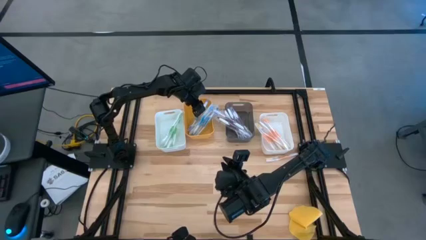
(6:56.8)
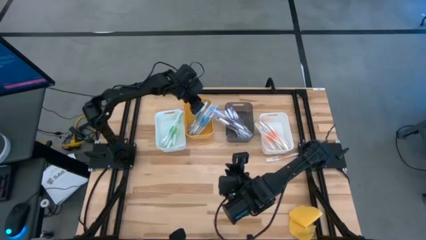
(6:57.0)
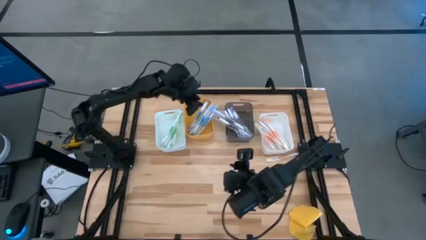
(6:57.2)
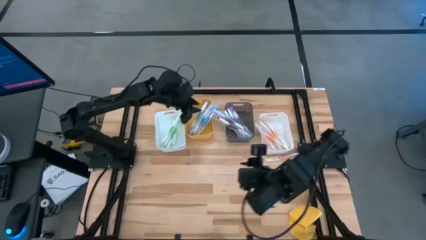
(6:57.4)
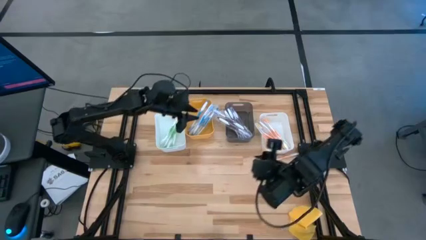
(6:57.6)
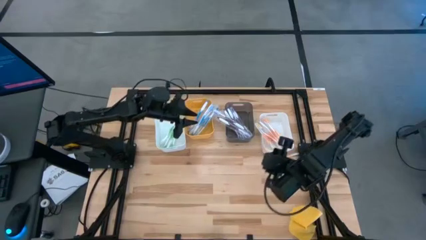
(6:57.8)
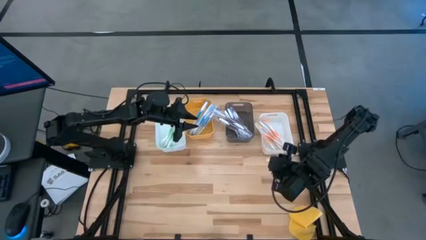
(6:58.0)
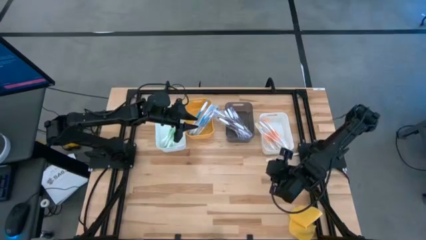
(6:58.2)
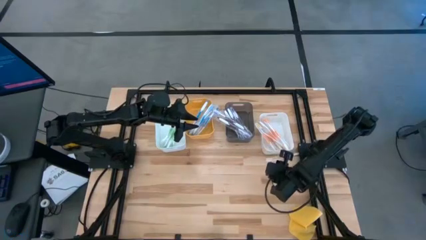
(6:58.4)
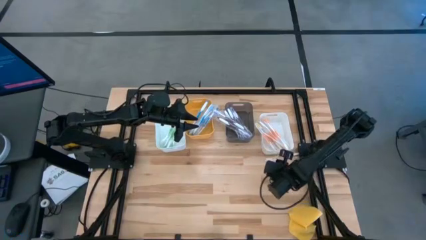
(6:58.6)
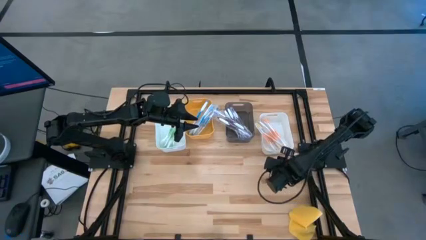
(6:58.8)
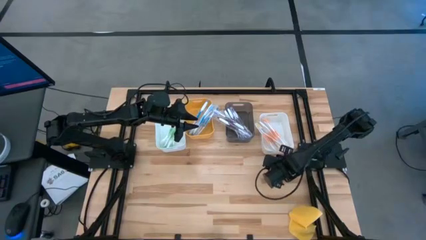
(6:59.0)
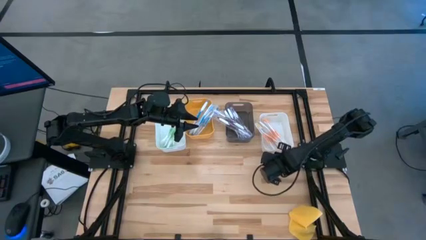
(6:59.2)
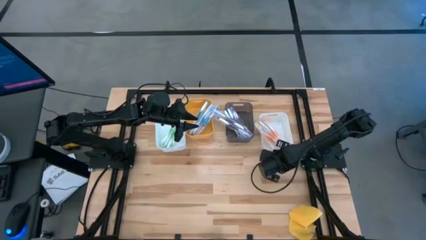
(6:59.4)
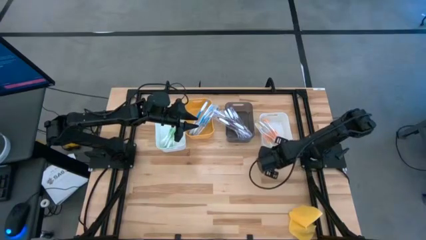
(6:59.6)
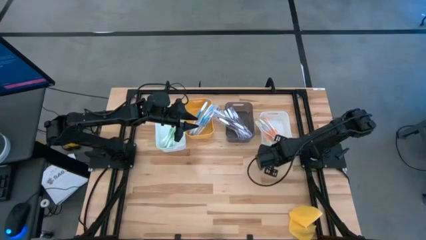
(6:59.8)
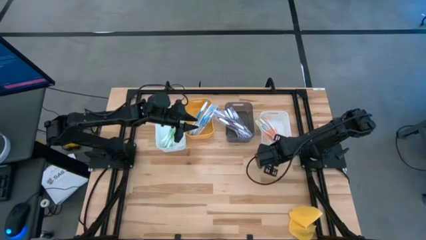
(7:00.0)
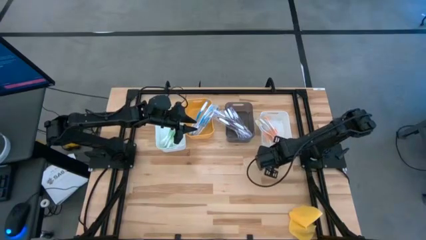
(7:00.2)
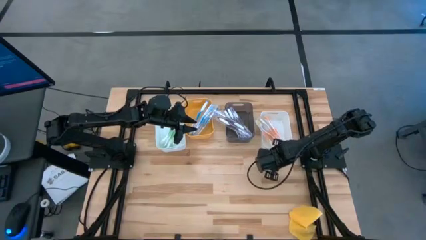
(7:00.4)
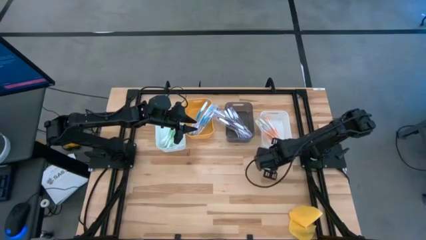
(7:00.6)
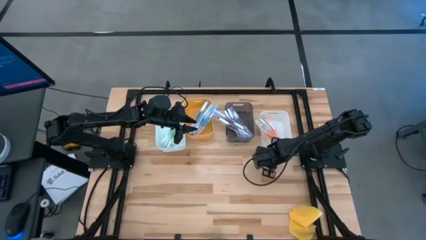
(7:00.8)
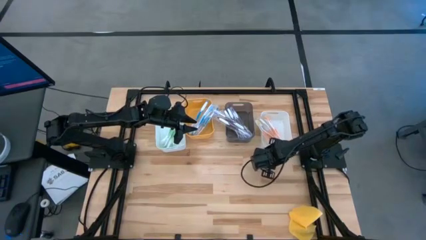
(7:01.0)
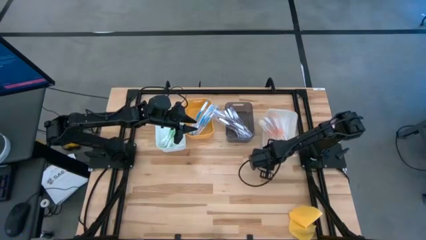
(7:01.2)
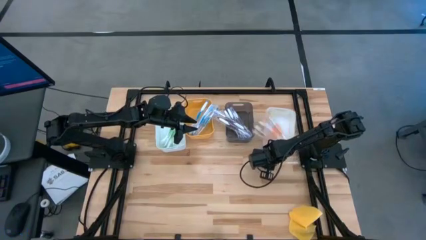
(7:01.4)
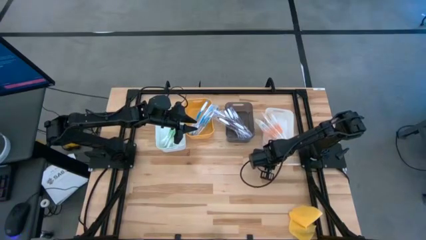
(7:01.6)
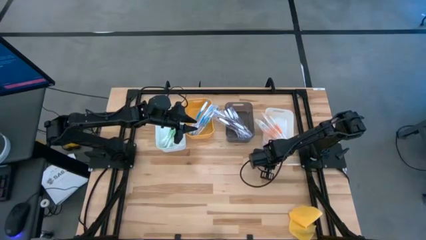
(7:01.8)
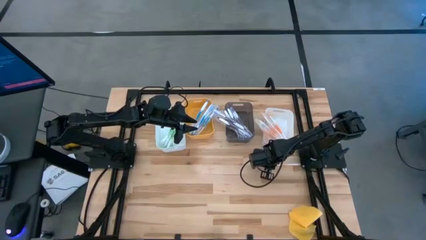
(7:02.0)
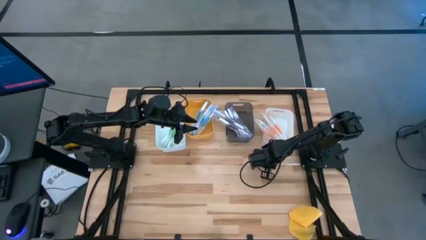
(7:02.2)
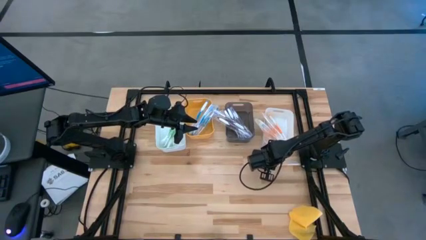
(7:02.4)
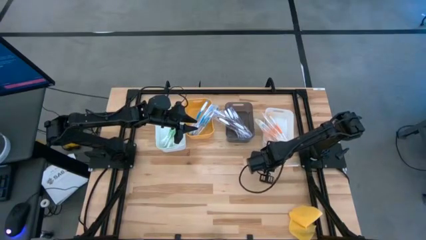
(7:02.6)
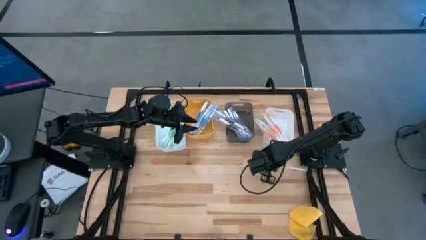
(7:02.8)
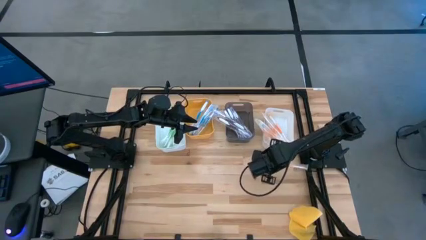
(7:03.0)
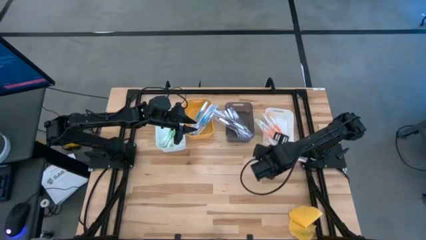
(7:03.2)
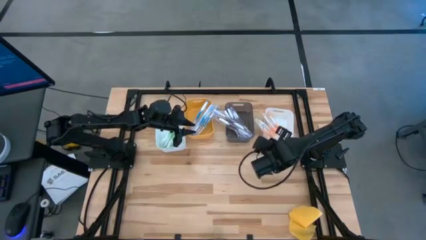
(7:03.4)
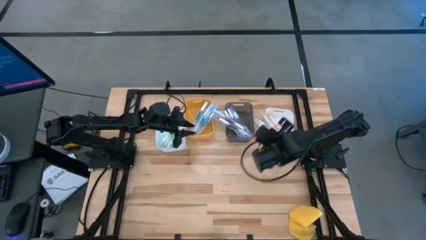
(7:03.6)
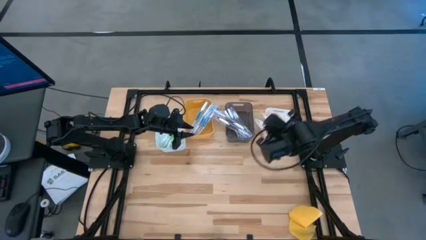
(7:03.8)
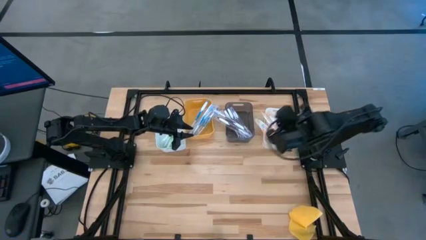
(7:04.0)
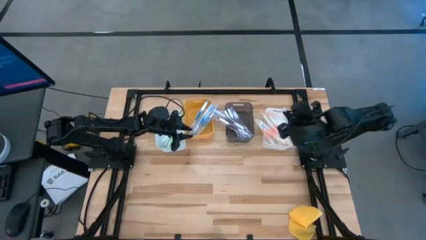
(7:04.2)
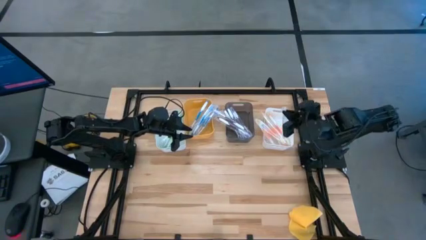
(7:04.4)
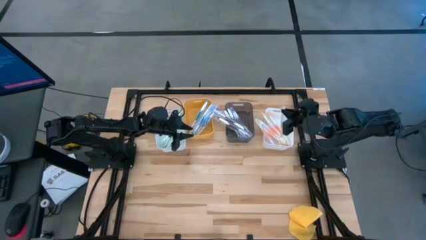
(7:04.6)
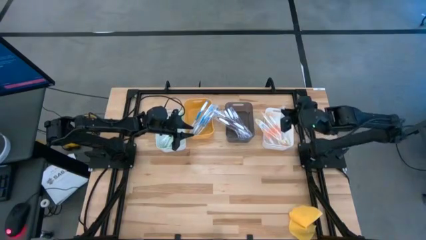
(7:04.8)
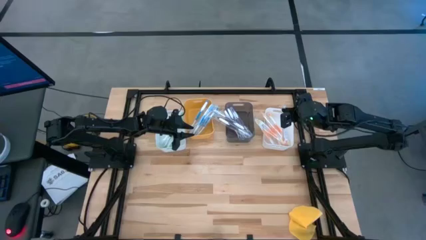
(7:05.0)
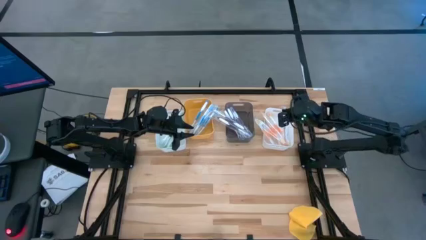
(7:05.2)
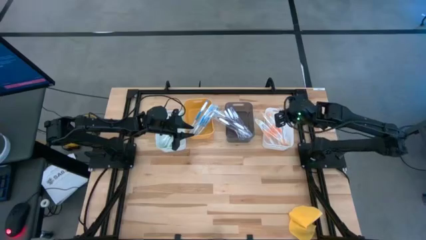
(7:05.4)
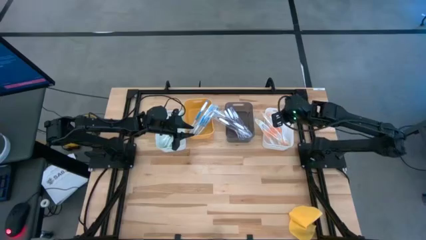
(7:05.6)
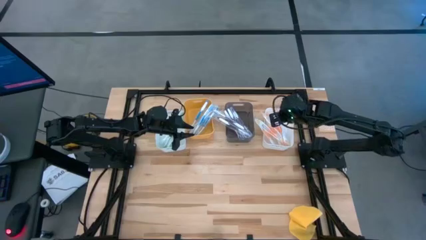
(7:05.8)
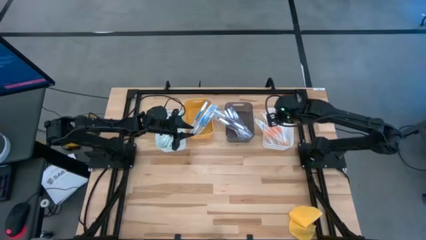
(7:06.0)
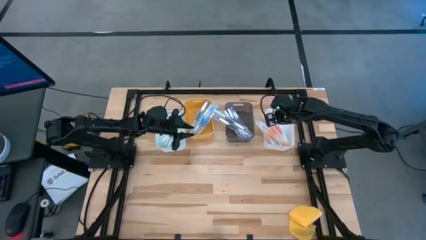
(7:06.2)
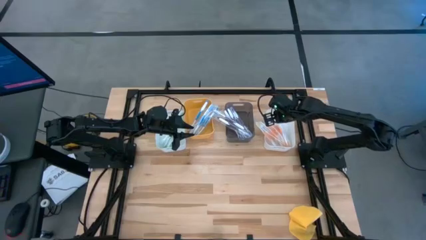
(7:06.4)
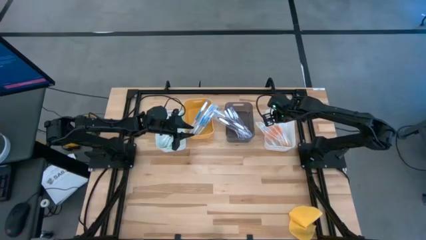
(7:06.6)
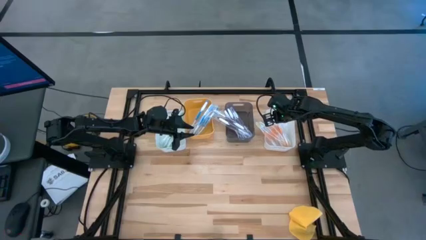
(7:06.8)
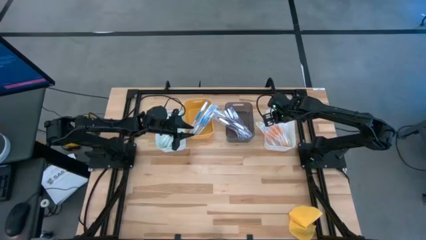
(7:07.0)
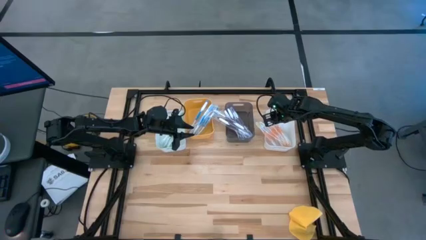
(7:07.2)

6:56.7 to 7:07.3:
Task: Pick & Place Toothbrushes
Put the orange toothbrush into the right white bin

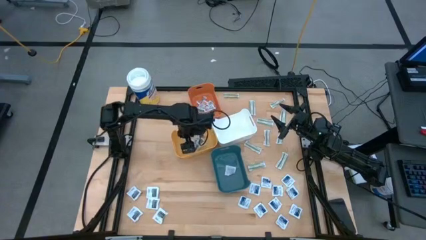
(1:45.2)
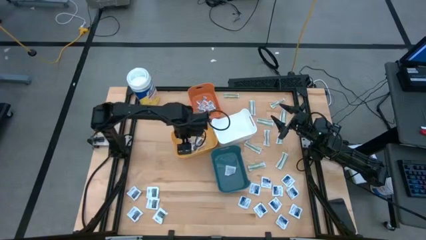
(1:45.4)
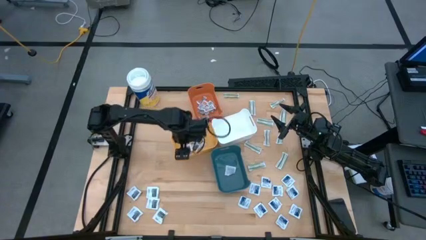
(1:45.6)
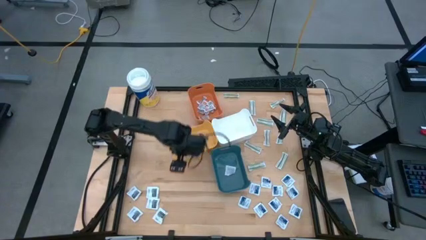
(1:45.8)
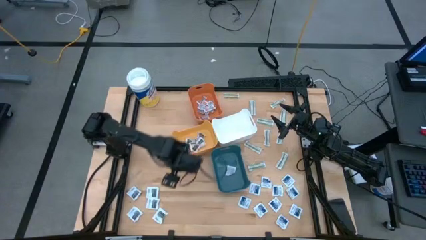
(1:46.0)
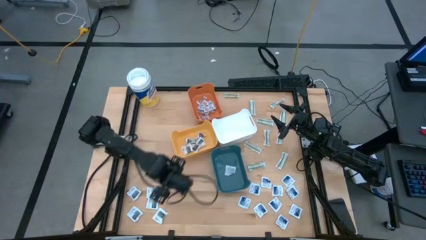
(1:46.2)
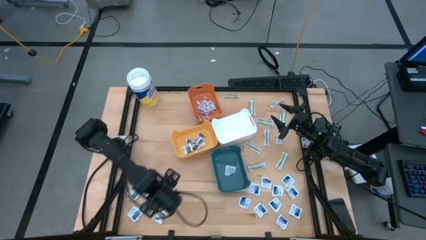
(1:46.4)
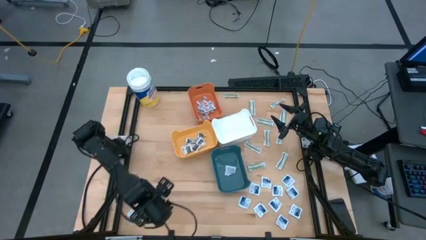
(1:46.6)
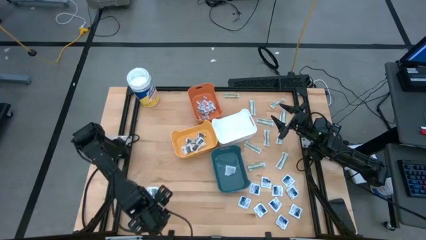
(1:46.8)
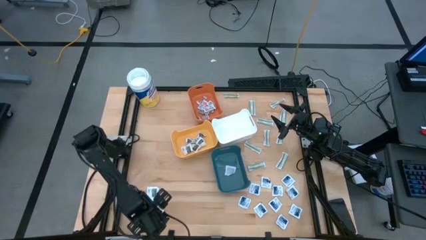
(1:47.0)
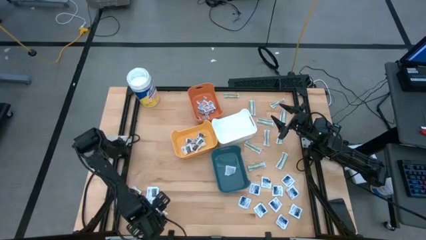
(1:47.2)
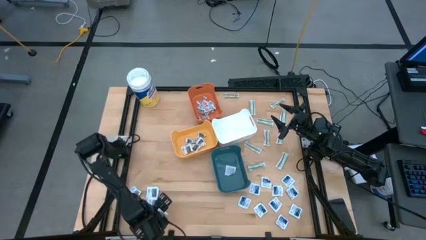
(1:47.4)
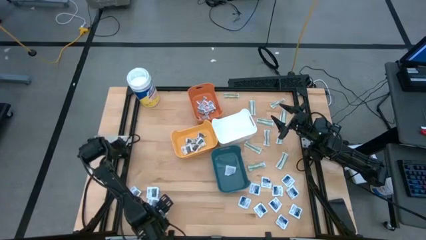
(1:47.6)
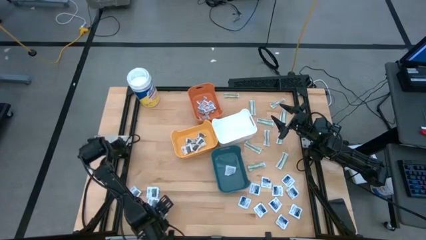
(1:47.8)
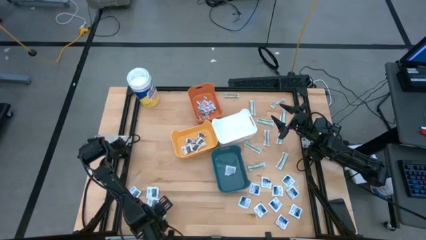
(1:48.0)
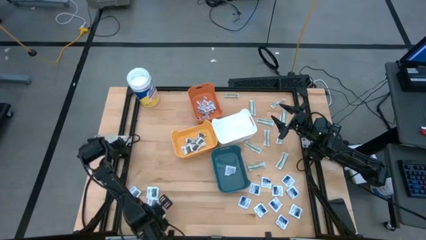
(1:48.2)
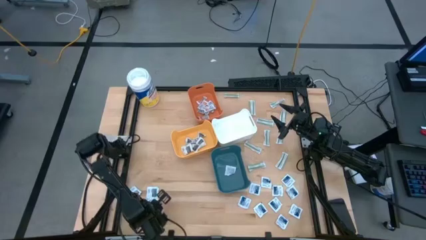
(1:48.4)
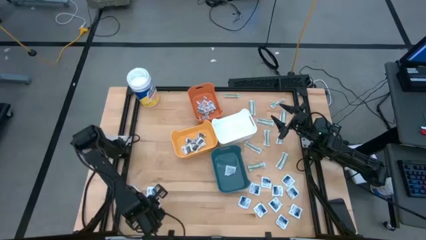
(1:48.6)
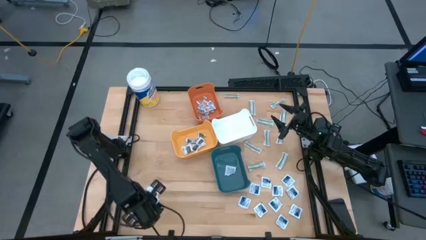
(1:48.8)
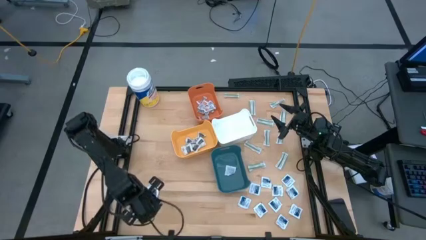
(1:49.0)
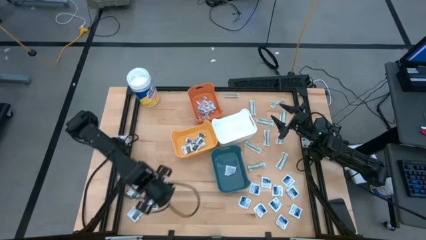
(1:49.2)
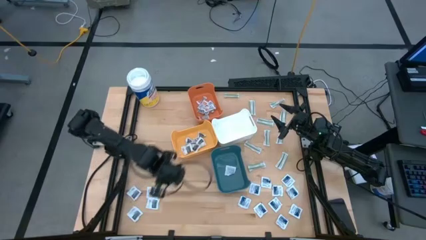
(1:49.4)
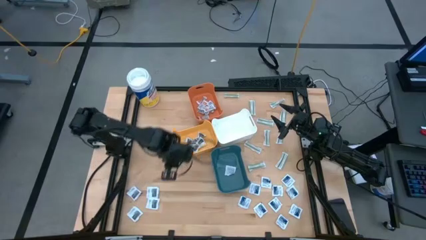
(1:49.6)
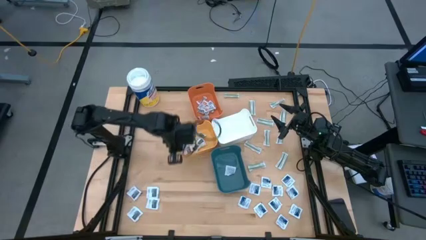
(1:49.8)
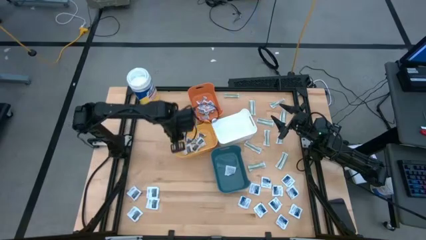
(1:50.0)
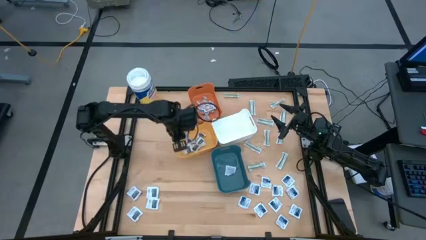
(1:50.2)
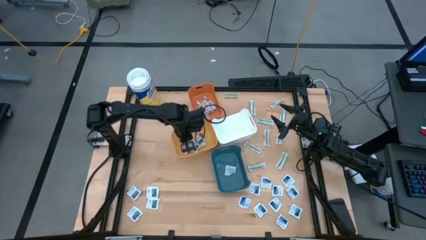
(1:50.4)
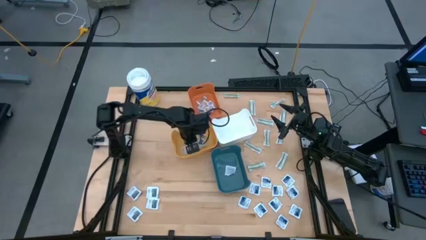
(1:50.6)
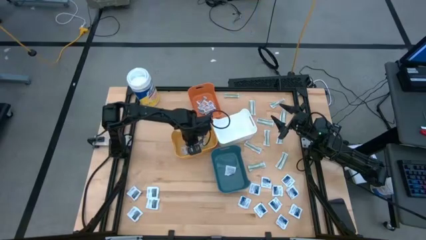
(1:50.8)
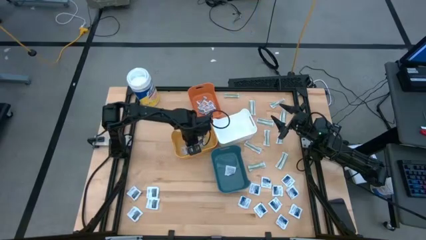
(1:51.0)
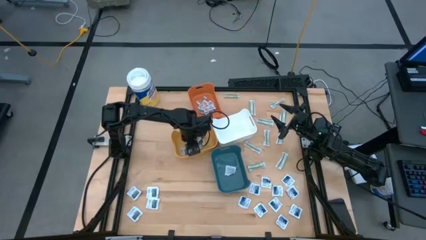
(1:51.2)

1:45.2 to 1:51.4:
Task: Pick & Place First Aid Supplies
Put the black towelette pack into the yellow bin
